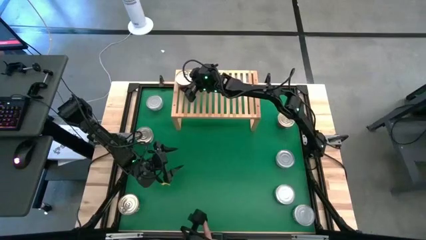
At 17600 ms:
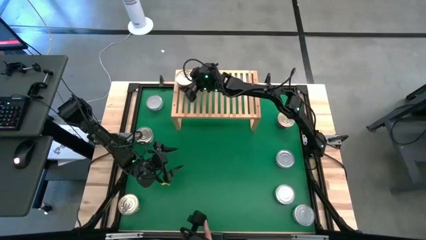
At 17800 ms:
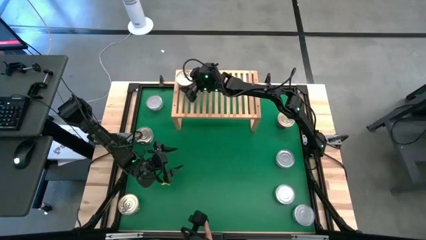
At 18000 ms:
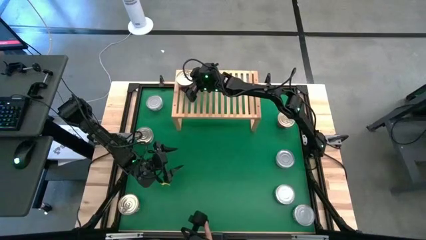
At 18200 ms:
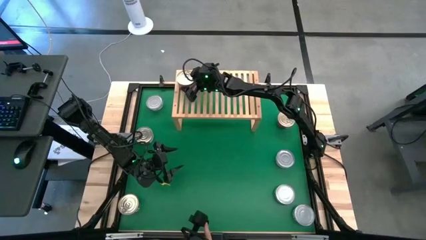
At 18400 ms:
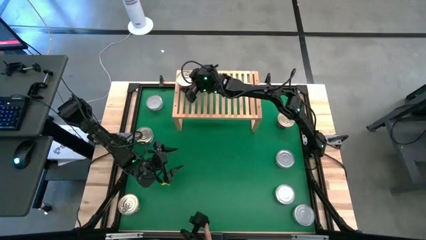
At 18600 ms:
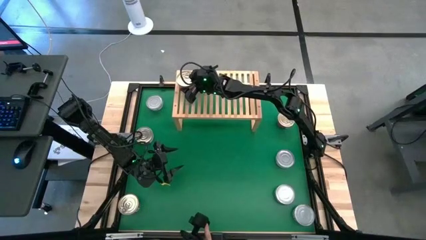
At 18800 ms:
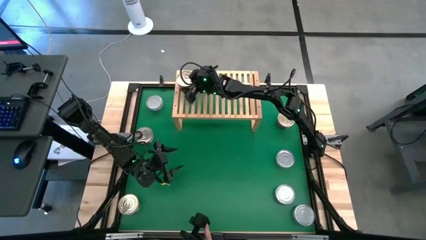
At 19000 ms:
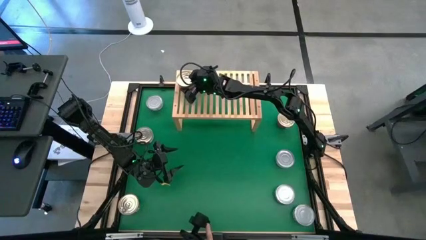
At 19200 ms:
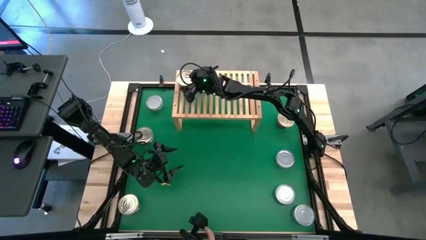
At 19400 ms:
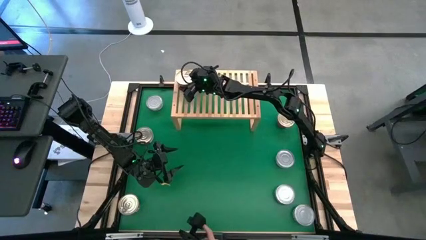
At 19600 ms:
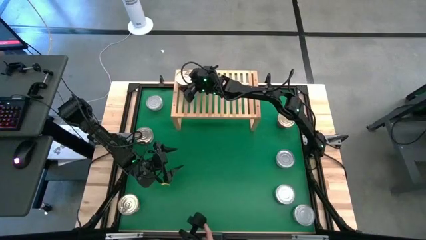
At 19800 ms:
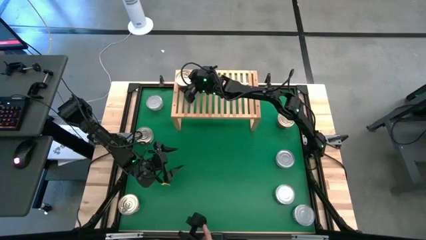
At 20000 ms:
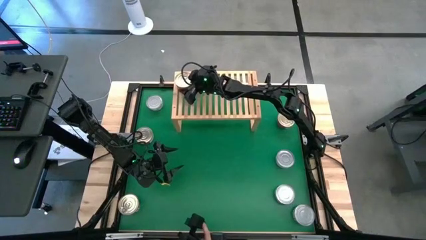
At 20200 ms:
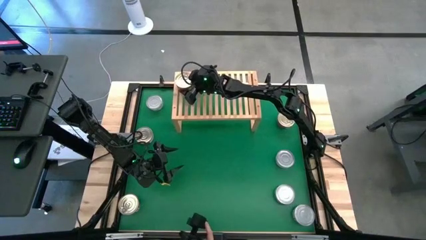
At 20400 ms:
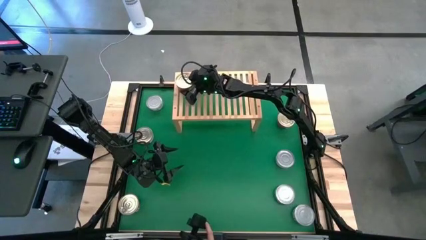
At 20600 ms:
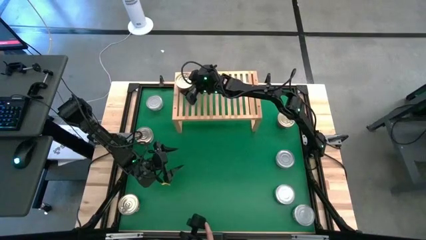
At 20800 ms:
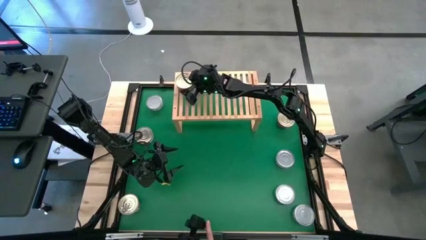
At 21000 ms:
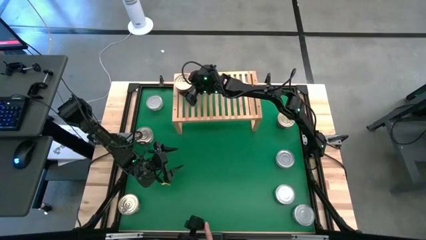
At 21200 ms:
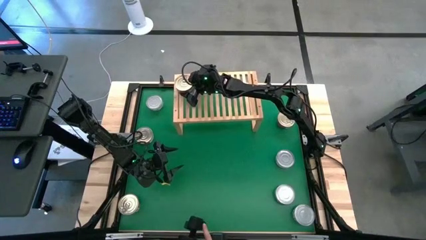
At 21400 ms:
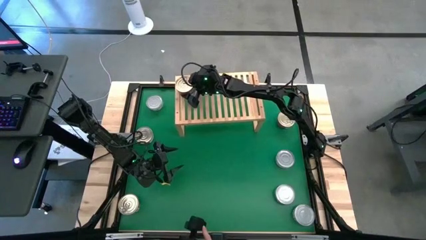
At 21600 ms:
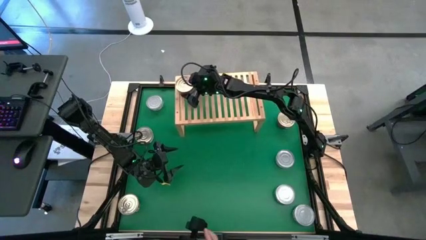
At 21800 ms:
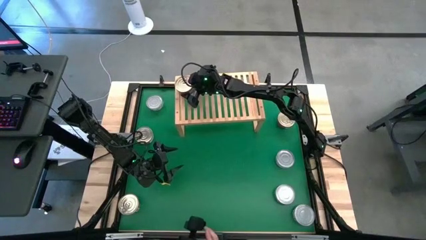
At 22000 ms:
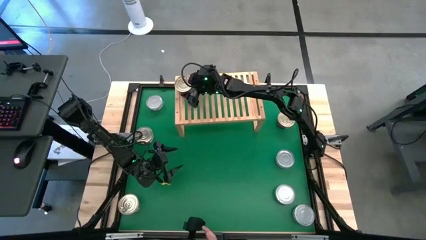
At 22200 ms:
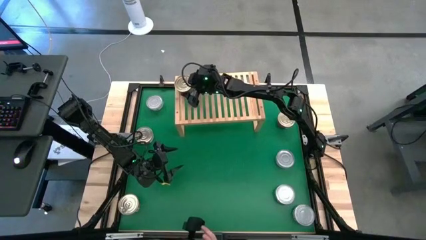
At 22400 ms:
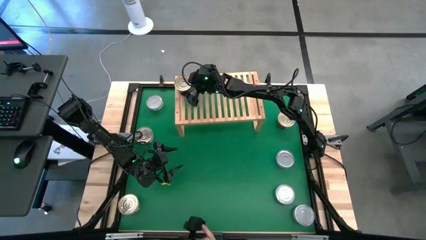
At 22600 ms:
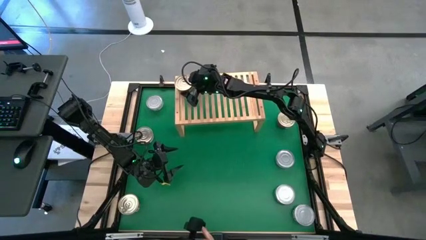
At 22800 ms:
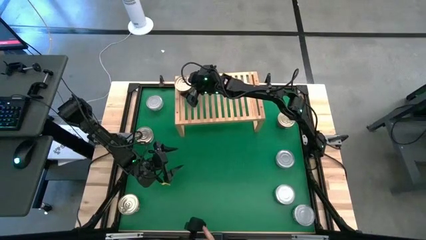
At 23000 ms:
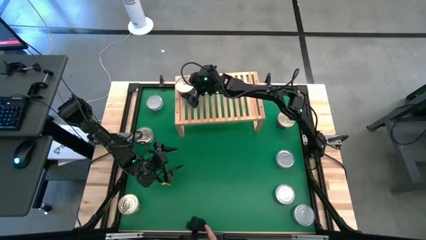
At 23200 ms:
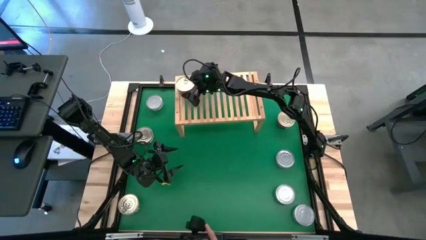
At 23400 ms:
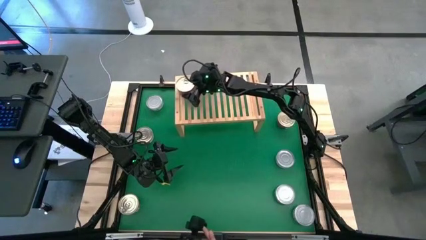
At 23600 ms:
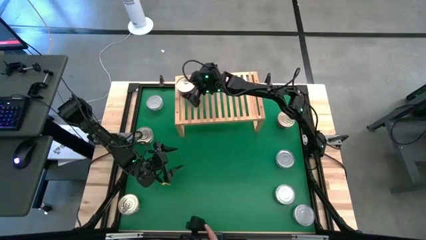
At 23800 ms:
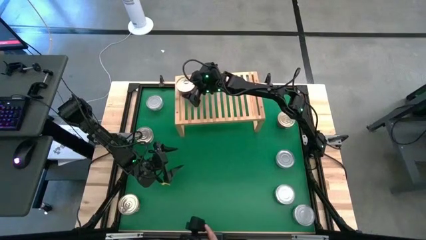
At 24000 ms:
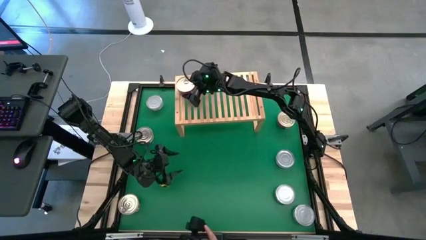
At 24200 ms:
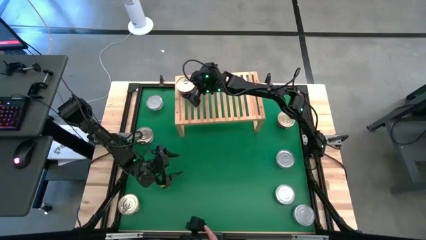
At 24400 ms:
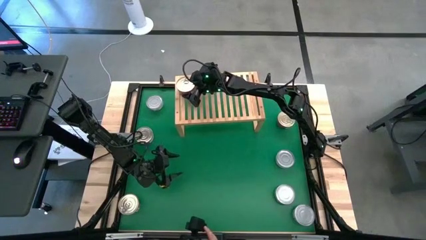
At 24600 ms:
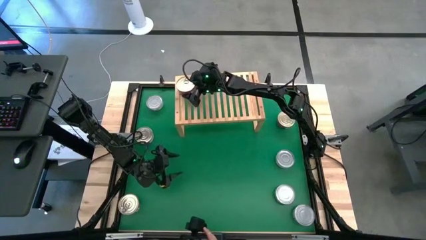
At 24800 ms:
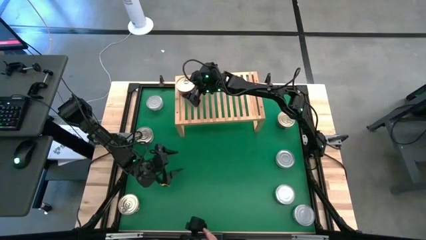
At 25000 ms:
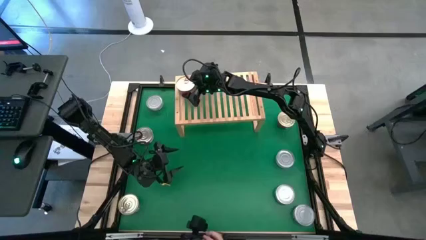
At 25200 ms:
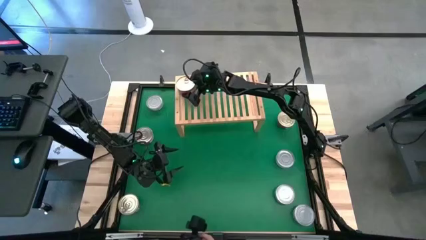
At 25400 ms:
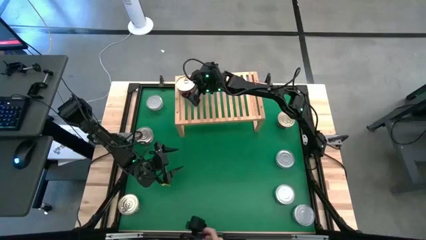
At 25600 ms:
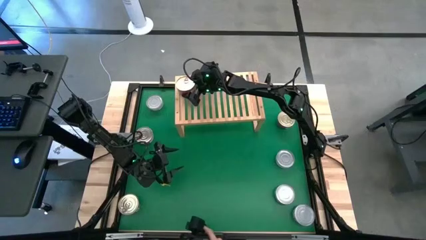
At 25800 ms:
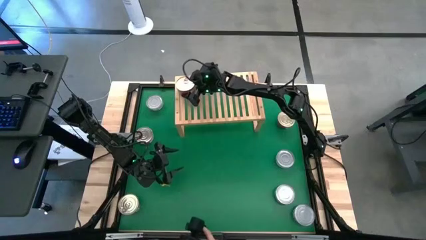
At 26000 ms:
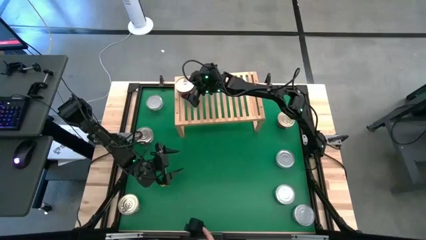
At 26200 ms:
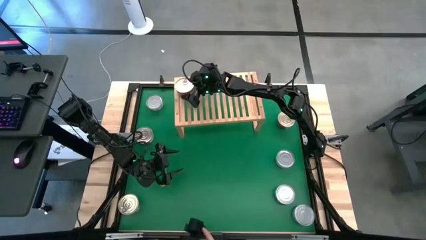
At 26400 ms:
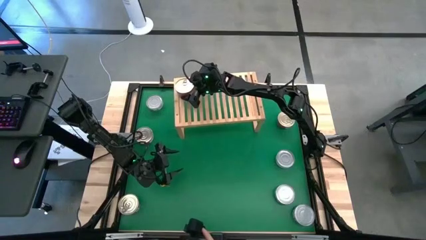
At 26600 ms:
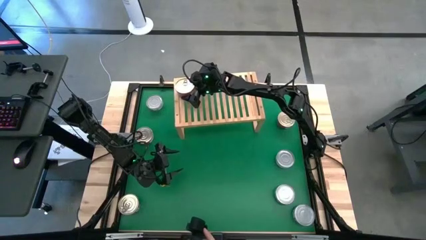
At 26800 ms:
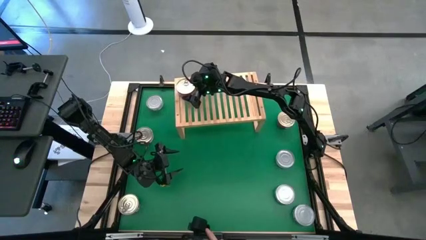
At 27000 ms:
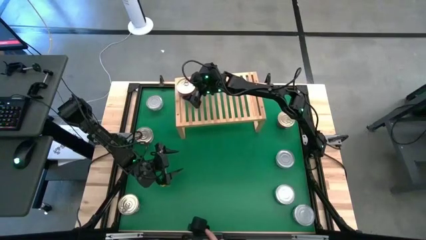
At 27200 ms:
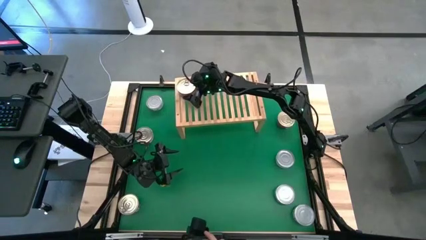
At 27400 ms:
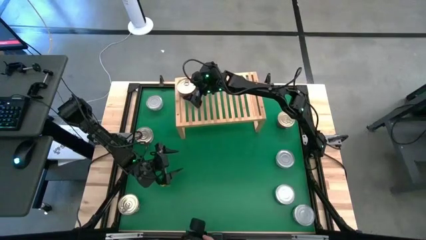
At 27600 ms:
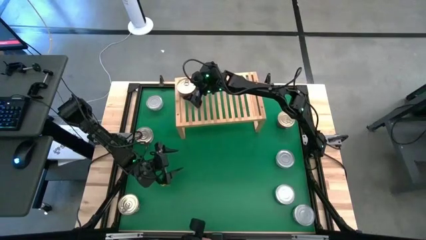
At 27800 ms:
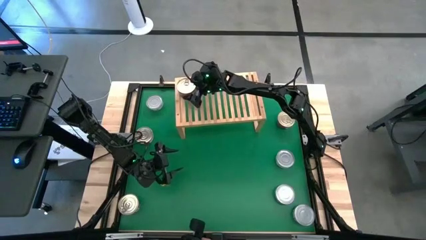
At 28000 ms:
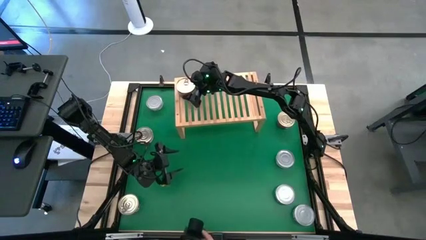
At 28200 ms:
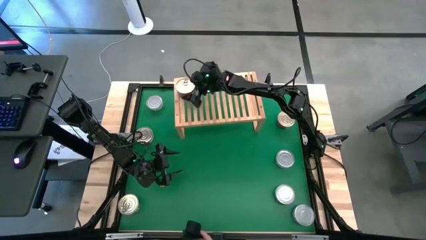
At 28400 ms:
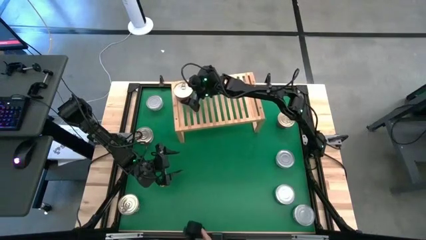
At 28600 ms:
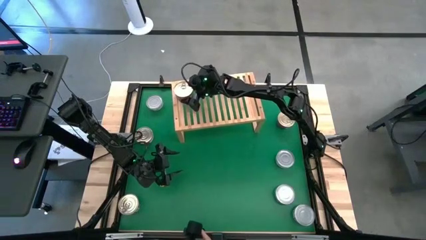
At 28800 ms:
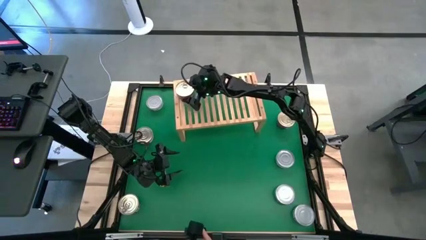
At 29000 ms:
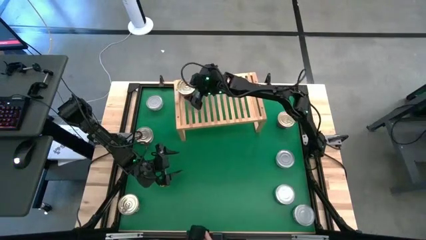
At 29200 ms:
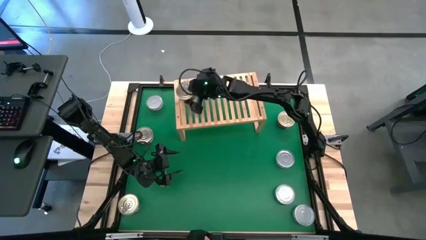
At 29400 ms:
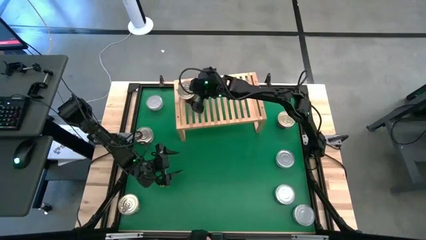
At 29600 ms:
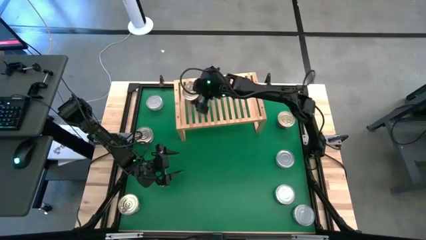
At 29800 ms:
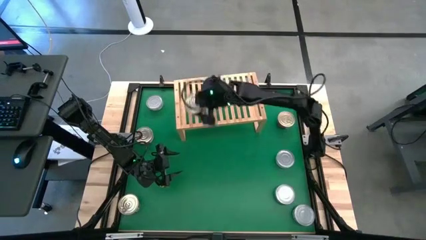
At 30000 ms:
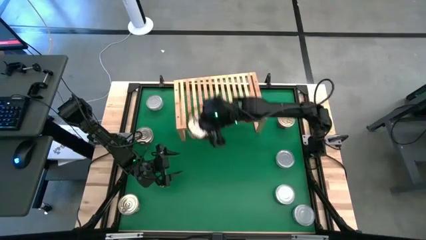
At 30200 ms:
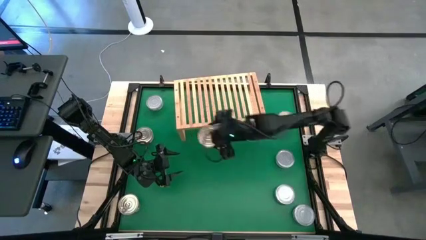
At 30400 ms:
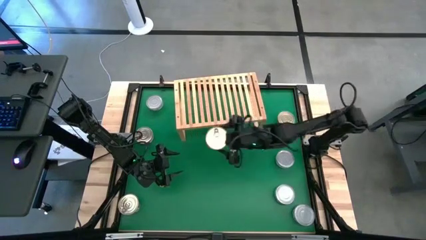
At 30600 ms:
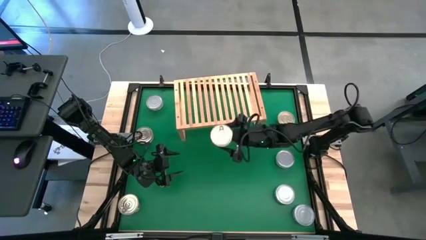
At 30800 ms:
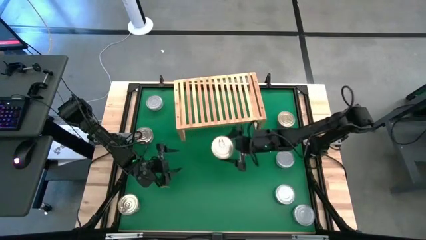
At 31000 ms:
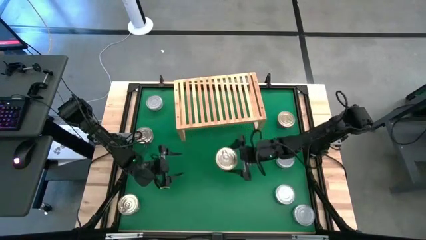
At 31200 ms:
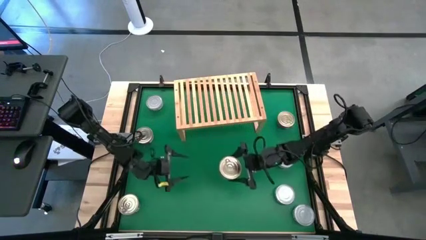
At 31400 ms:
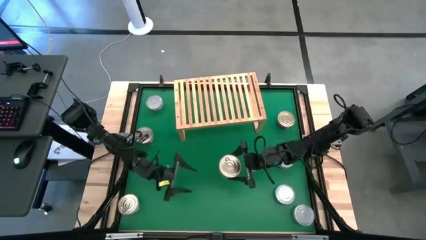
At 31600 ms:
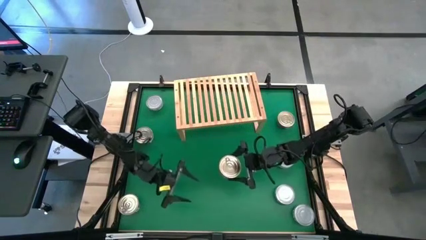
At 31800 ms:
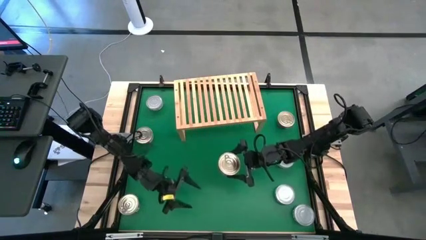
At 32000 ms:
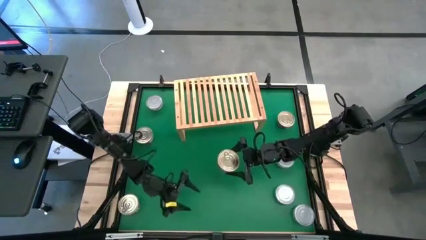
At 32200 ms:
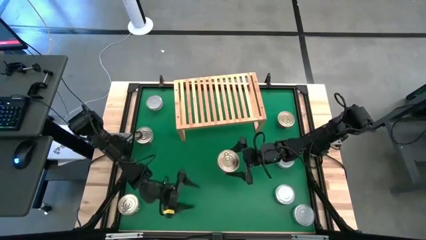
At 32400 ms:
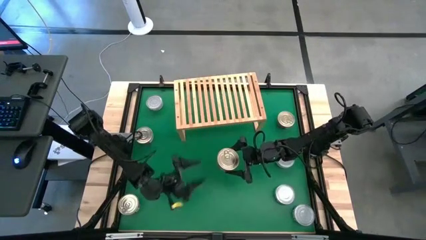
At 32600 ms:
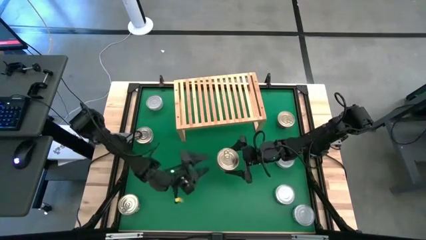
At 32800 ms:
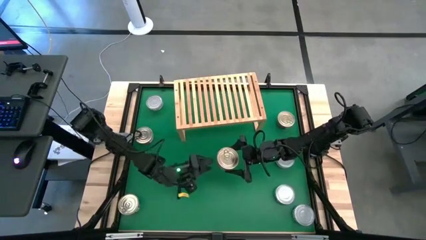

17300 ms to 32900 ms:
Task: Stack canned seafood by type on shelf
Put the center blue tuna can on the shelf
